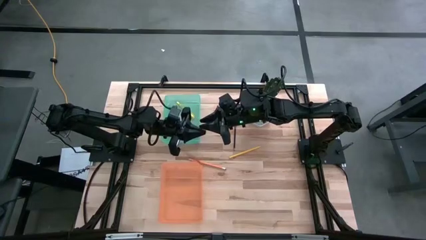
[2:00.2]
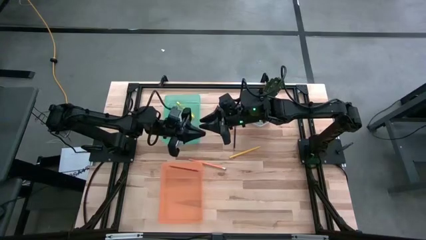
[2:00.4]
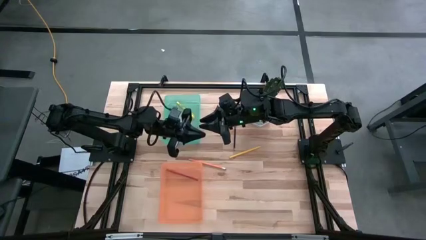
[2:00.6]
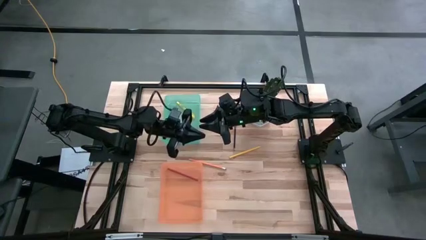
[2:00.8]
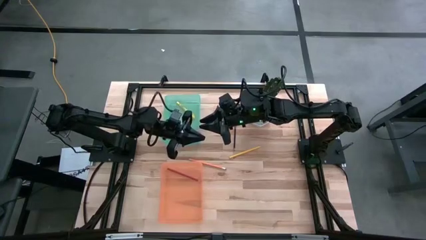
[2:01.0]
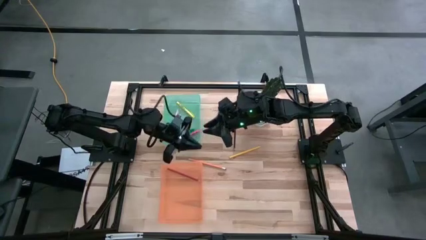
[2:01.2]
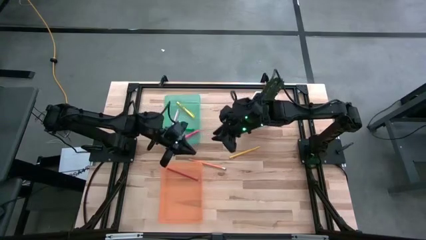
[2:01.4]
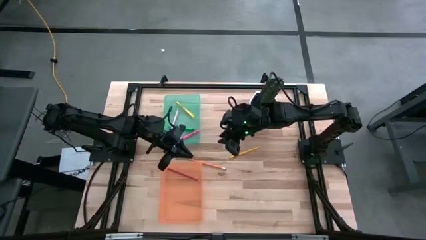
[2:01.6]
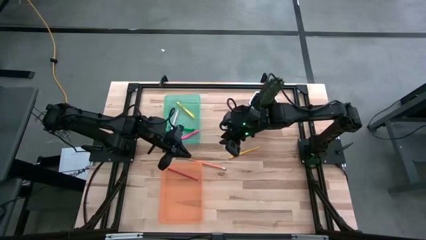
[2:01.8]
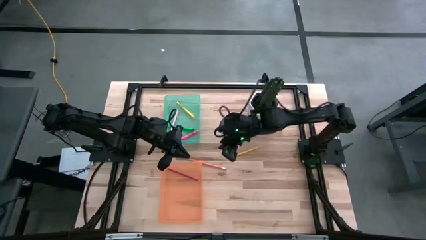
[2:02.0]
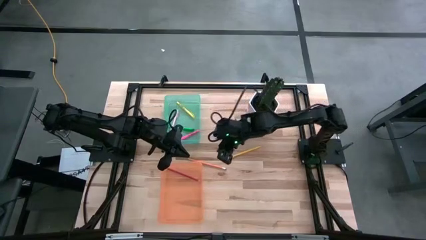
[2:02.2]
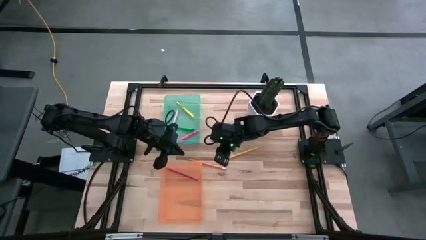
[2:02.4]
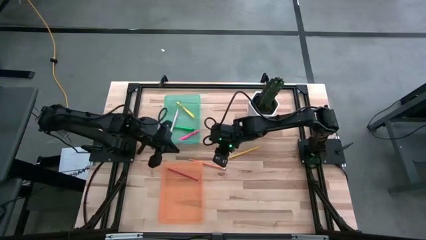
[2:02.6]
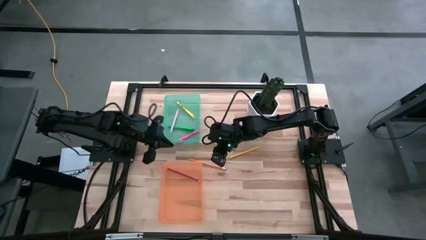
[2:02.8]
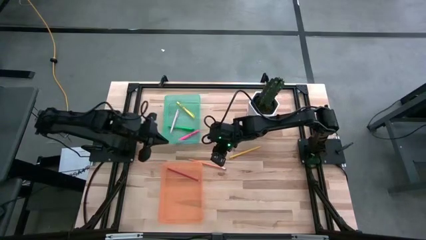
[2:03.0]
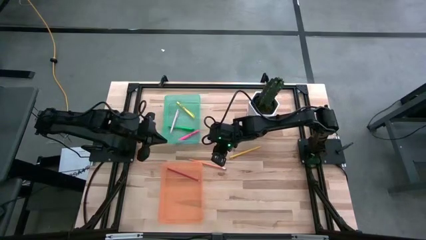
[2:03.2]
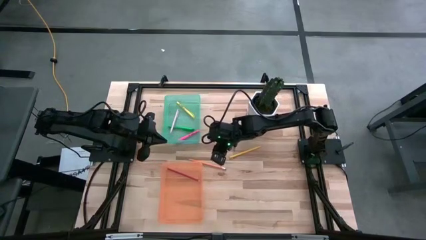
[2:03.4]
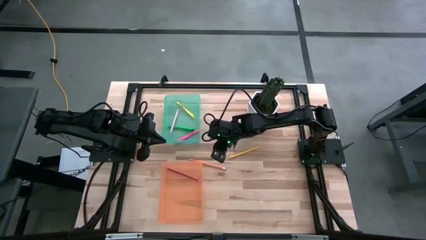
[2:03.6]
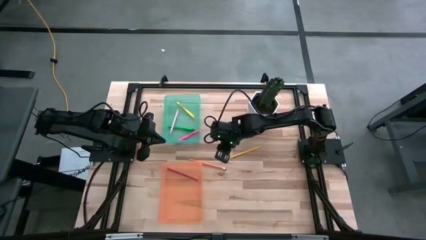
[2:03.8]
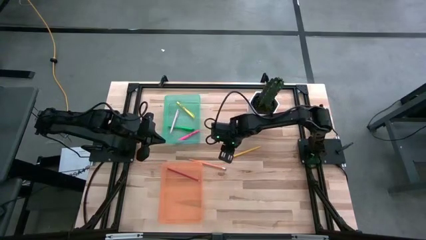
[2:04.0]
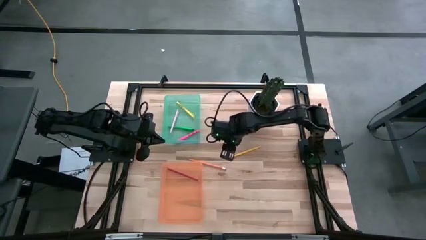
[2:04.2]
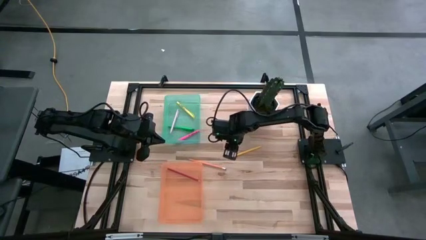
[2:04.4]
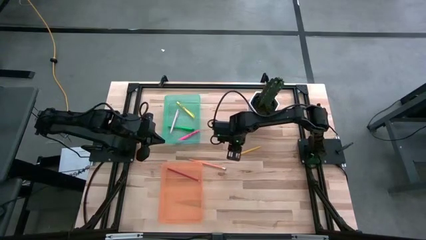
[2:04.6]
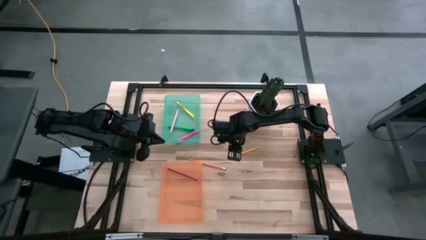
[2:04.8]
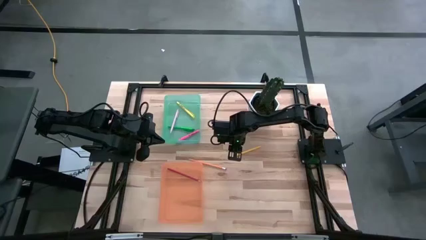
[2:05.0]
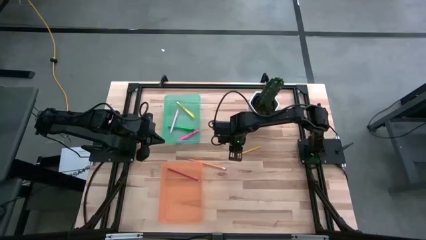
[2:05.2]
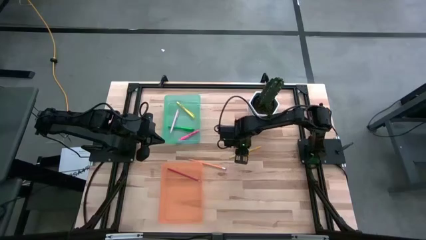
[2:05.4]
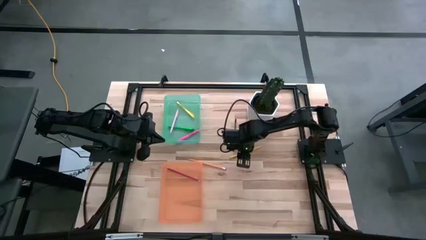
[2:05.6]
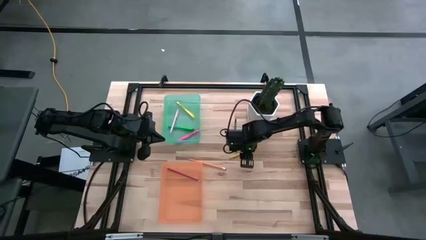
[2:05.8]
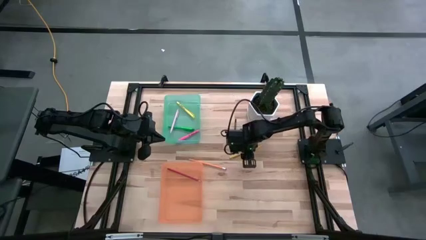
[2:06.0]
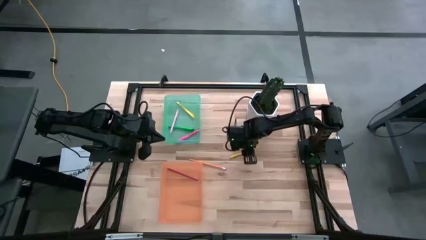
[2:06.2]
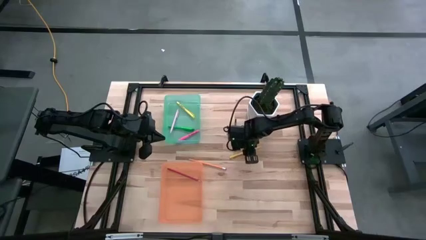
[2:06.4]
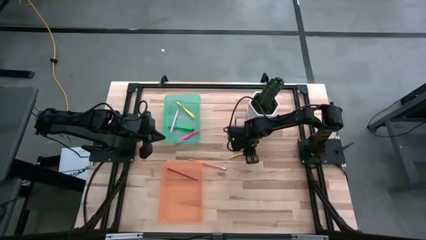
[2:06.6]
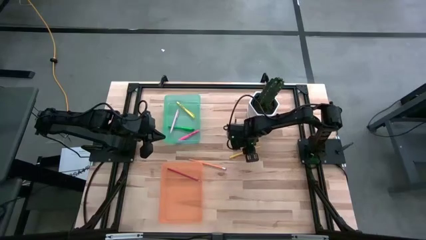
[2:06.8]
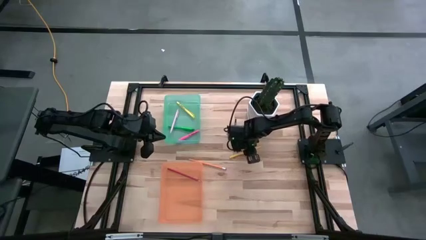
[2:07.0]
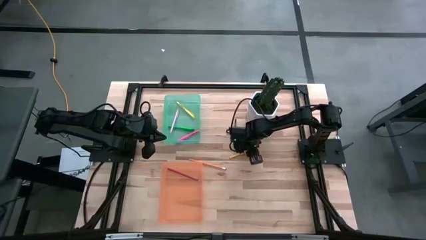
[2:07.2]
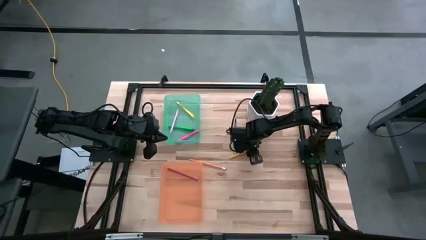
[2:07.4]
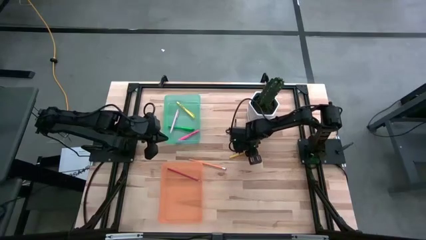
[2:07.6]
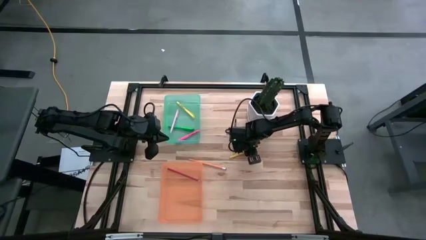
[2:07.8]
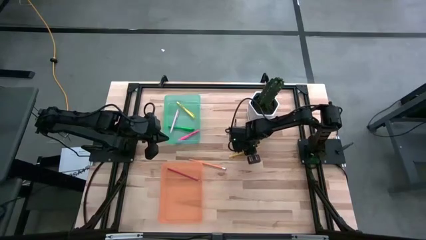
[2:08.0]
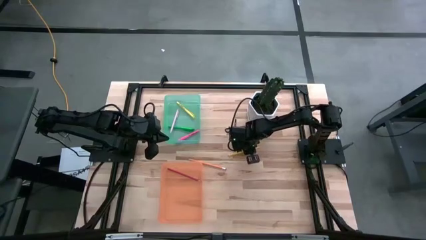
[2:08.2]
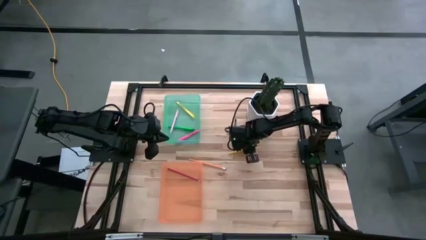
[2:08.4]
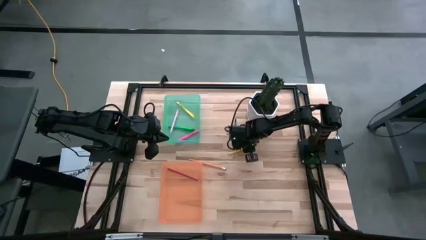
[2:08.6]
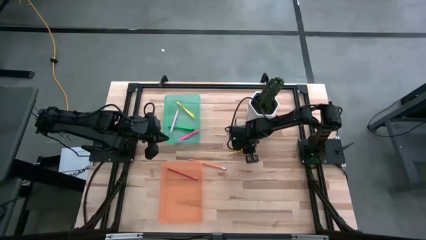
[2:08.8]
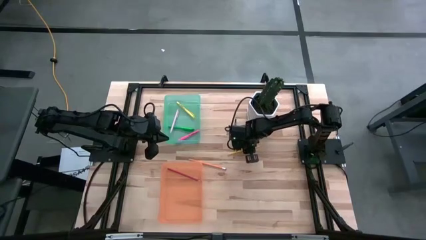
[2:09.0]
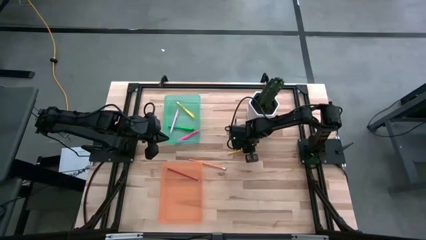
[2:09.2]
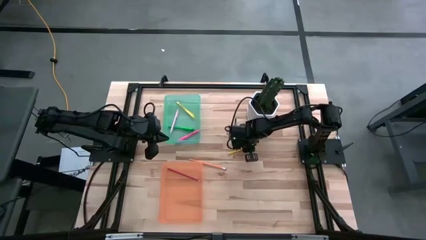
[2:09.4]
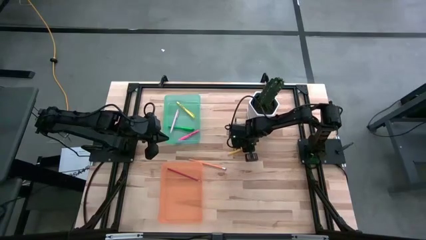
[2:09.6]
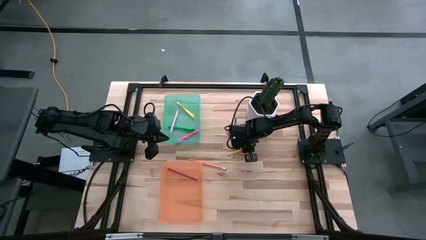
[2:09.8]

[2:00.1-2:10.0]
Task: Sort pens & pencils
Put the yellow pencil into the orange bin

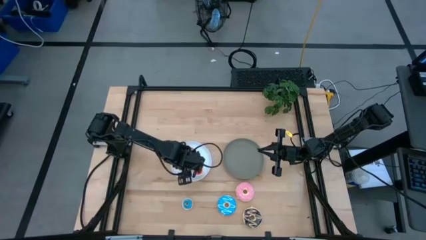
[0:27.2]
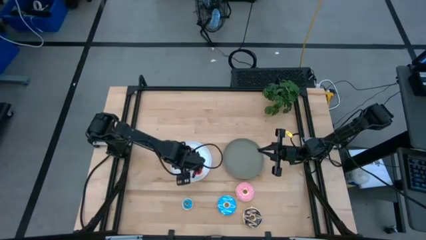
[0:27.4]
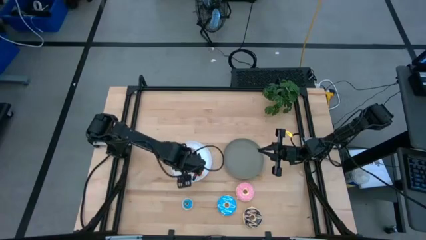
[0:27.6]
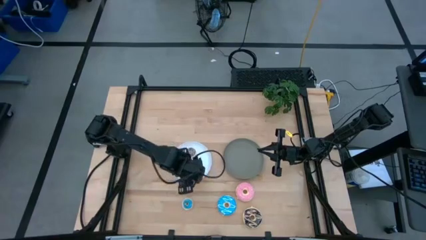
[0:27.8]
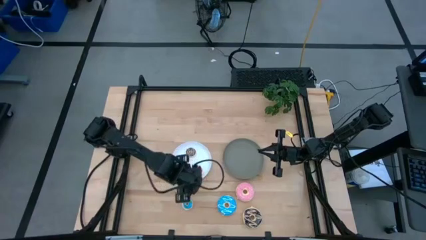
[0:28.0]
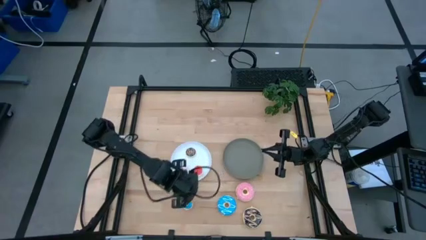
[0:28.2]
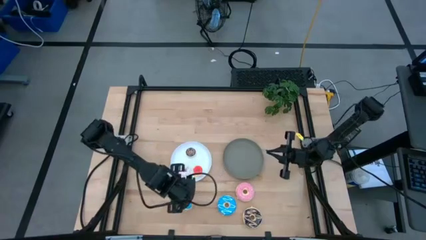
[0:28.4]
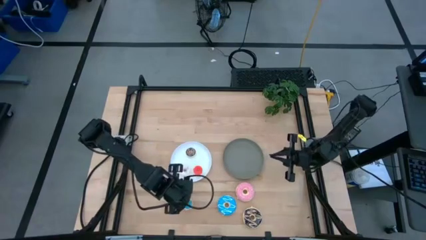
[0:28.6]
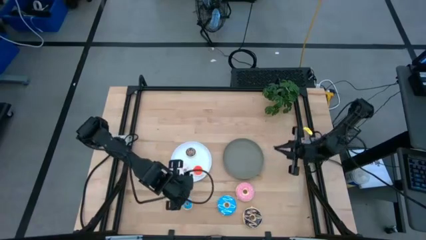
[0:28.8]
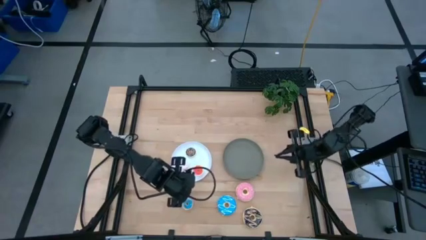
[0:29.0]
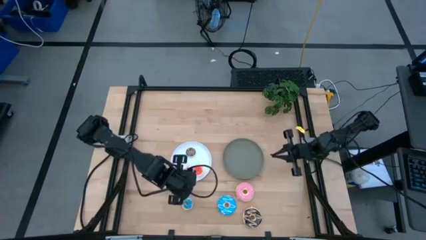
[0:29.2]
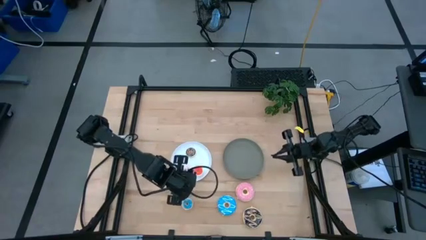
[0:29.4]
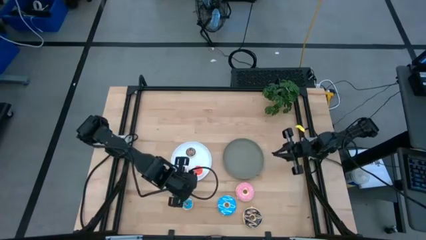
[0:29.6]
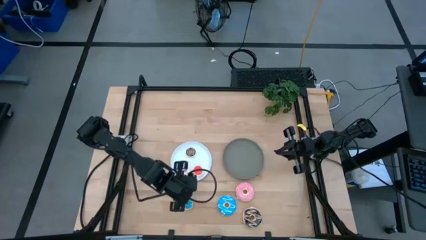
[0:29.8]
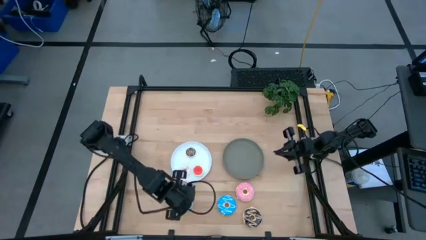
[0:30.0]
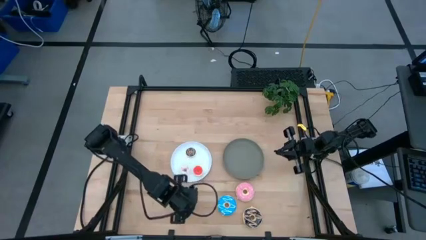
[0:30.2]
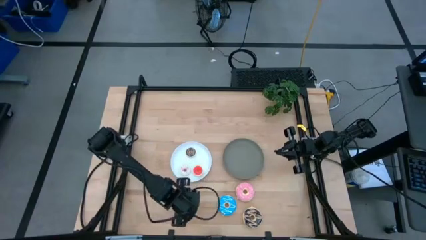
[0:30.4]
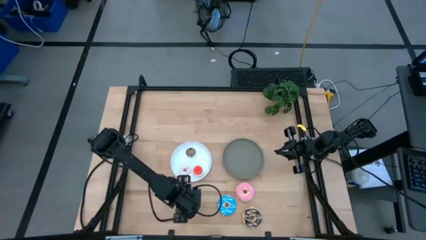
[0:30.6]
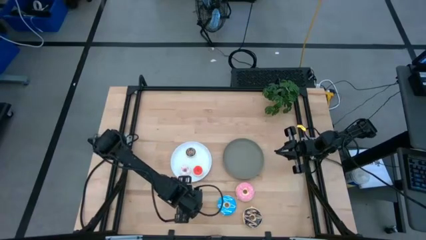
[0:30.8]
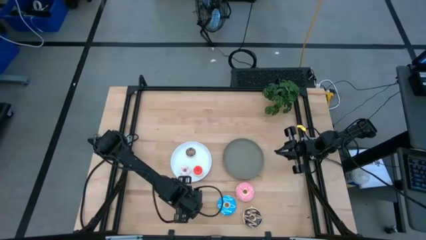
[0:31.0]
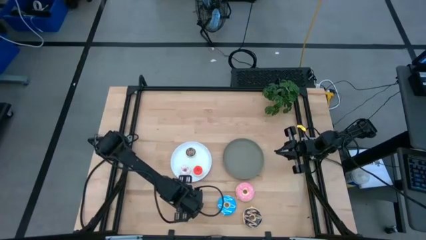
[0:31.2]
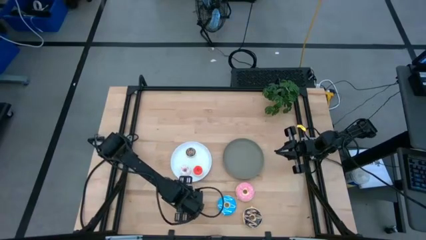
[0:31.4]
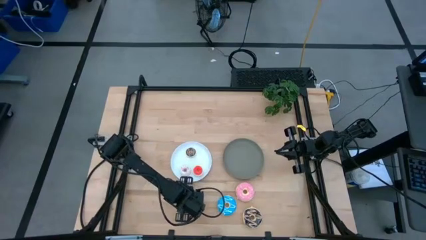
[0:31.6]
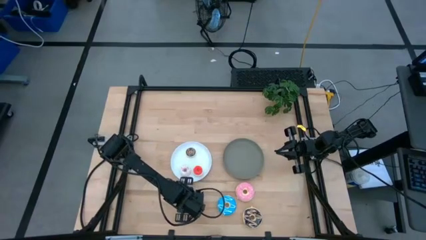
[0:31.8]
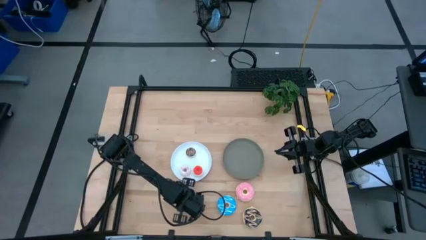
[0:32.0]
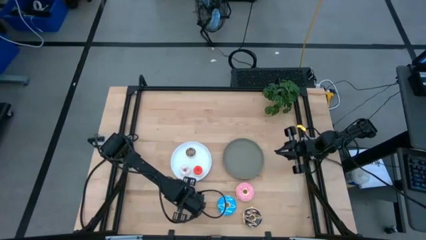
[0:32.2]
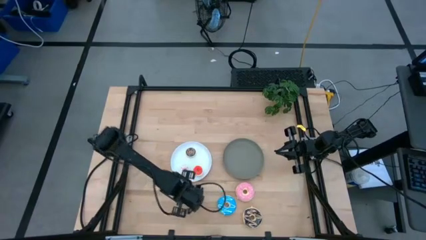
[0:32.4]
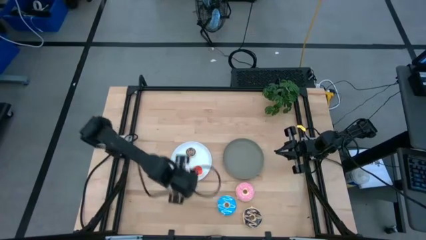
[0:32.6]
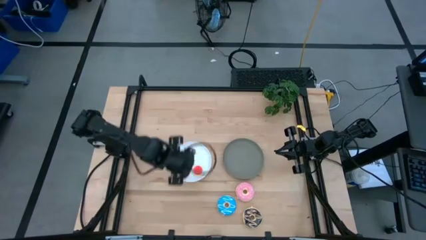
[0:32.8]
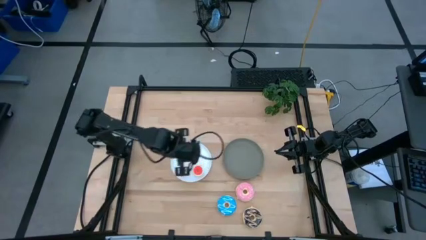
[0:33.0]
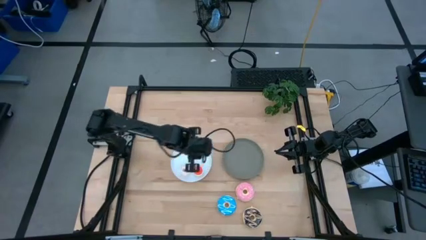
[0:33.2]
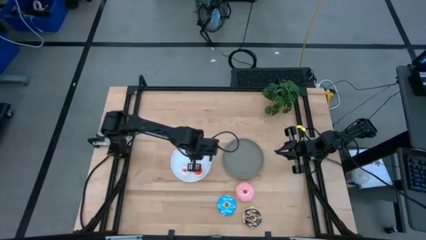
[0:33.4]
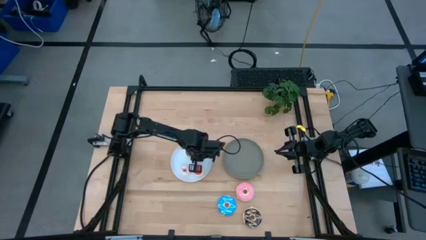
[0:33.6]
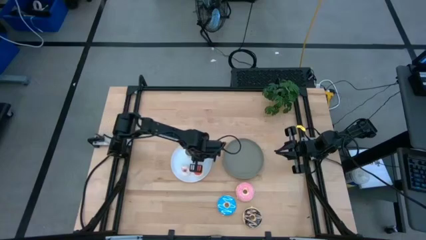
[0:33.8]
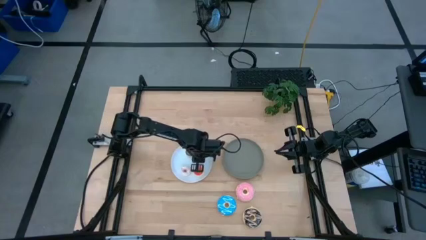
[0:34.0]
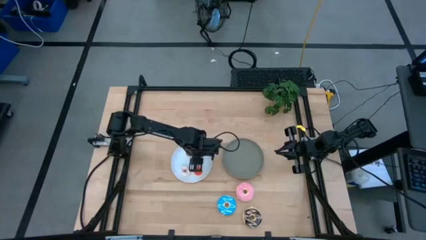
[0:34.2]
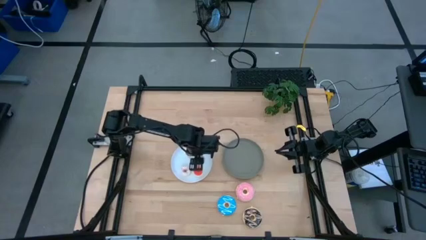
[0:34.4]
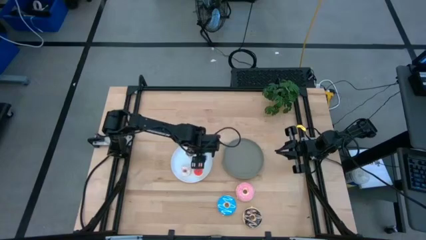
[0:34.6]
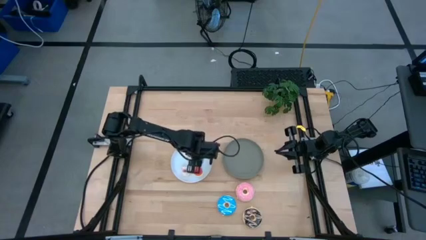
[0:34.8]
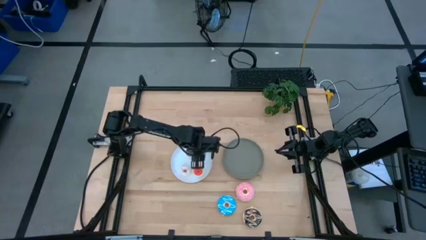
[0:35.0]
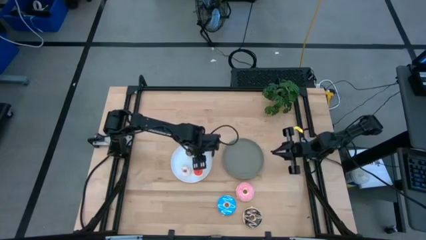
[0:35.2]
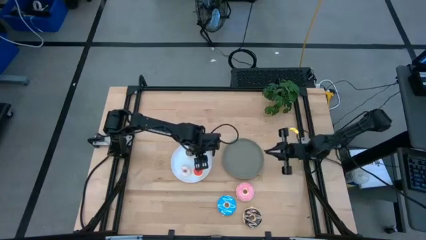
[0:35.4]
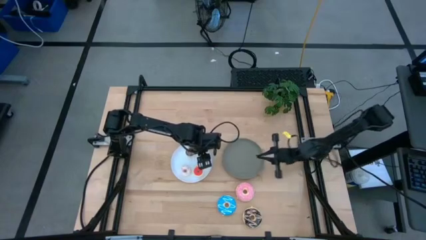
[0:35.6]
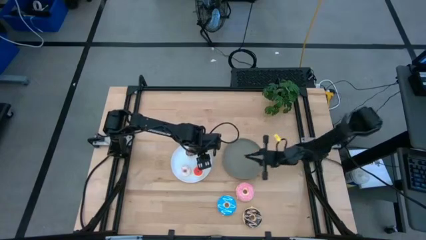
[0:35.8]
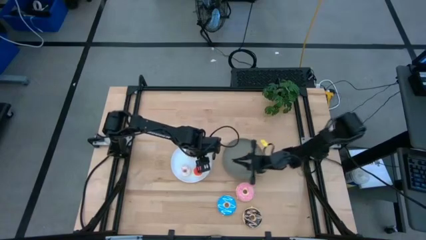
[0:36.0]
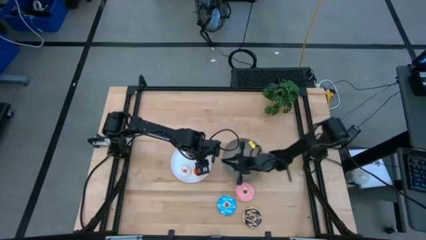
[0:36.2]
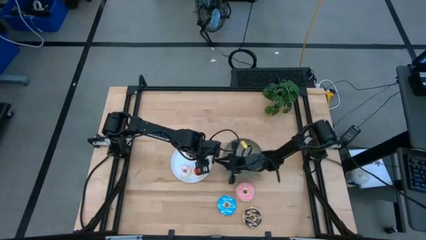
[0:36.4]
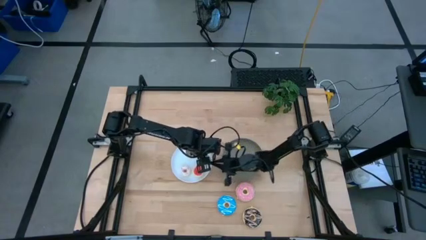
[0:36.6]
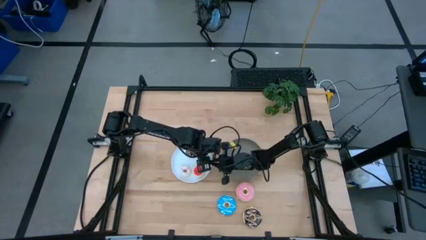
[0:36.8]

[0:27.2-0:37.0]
Task: Pick & Place donuts
Put the small blue donut on the white plate
